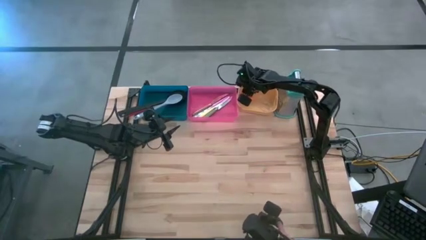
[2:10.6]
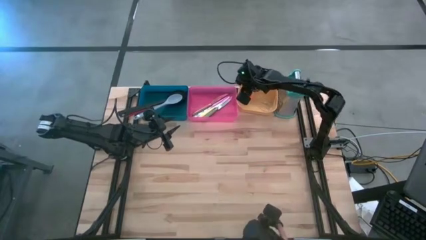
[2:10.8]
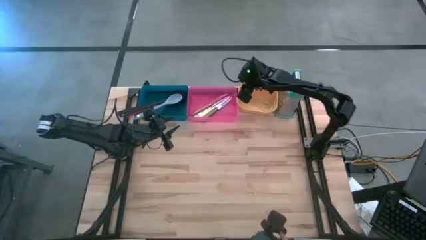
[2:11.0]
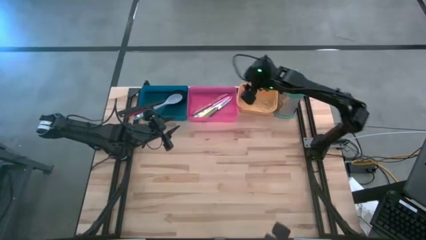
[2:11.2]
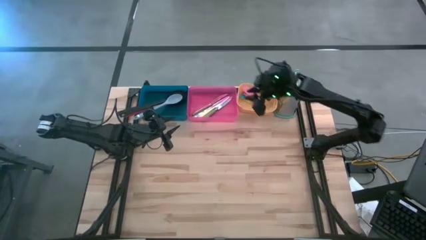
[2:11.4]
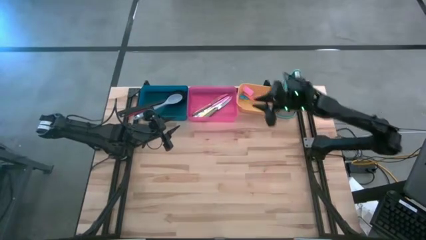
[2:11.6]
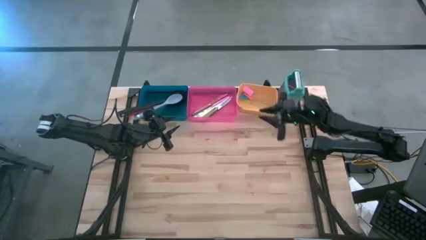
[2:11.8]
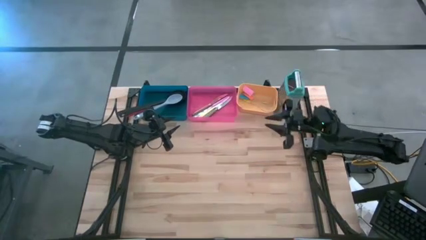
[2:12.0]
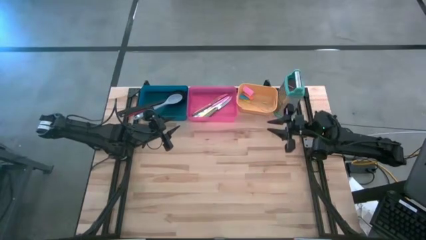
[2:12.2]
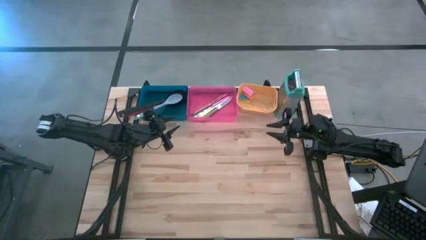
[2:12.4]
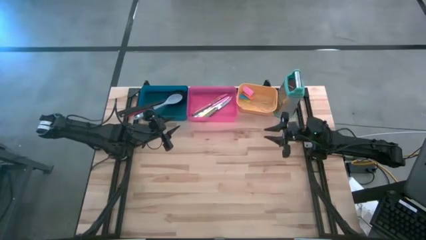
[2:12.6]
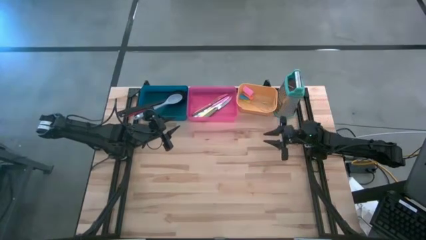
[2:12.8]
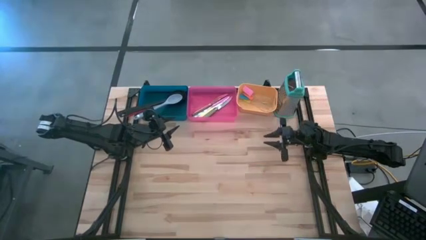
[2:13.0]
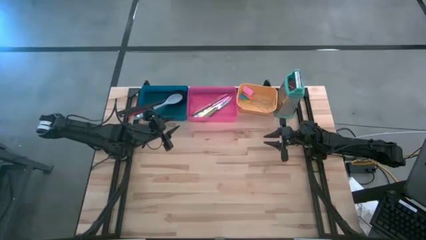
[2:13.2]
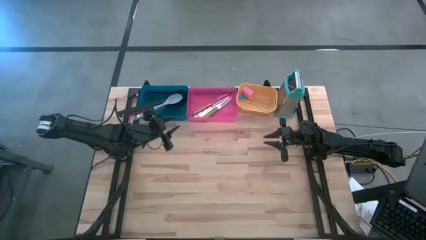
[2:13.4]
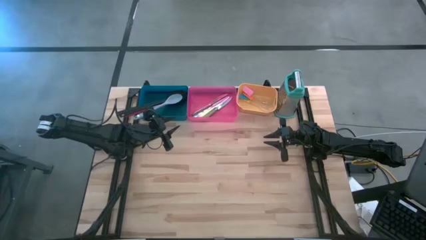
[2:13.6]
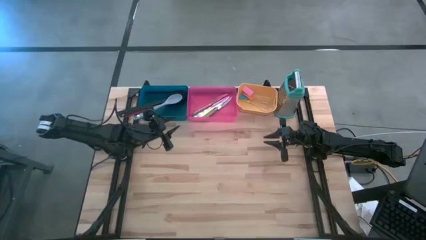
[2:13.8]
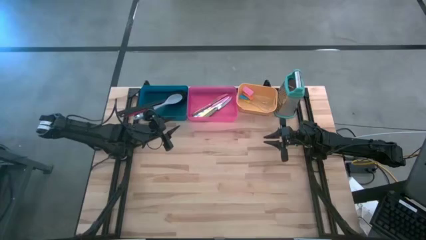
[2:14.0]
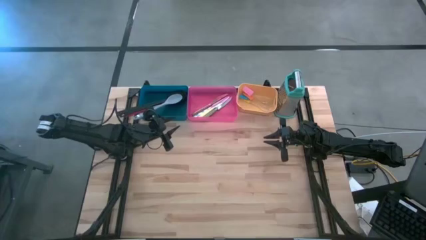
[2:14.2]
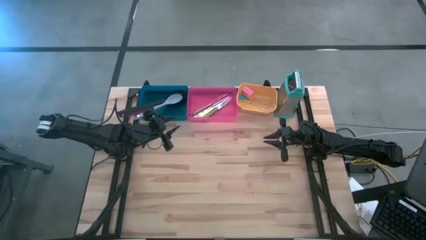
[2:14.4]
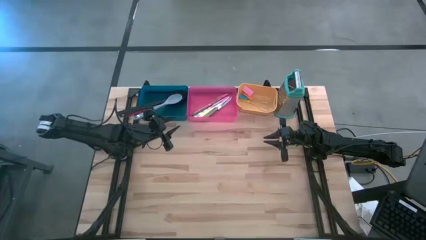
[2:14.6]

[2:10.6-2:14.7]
Task: Pick & Place Kitchen Items
Return to Home Position

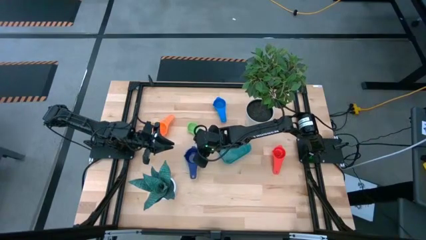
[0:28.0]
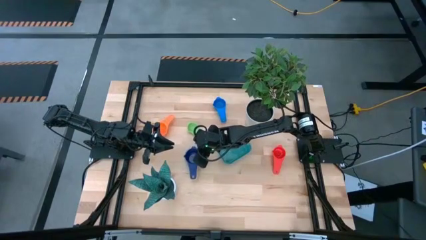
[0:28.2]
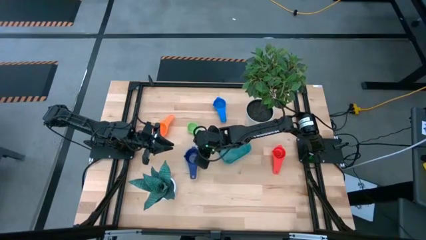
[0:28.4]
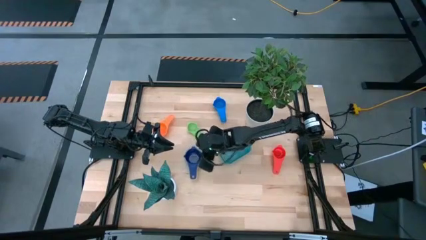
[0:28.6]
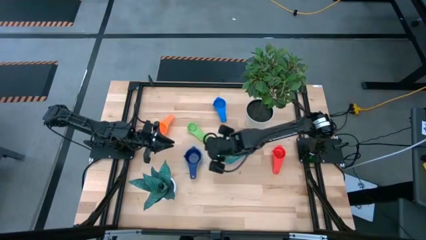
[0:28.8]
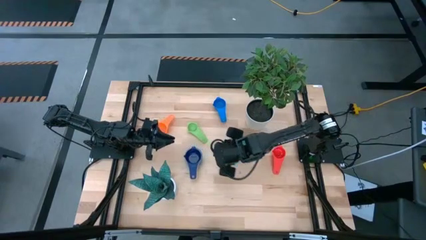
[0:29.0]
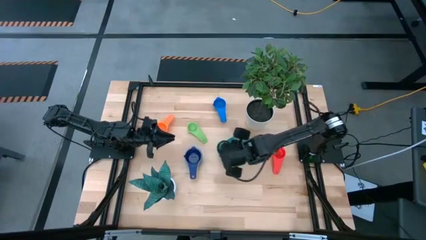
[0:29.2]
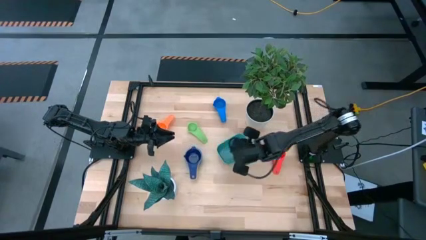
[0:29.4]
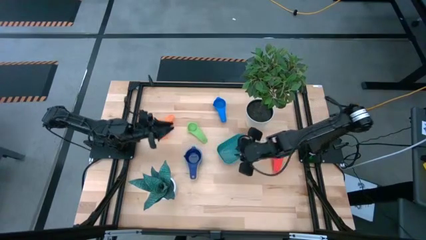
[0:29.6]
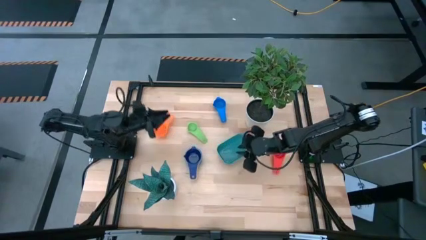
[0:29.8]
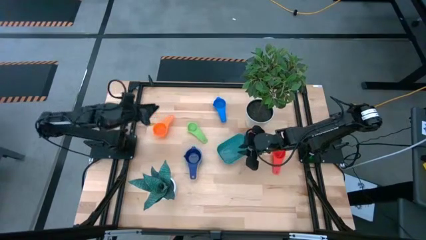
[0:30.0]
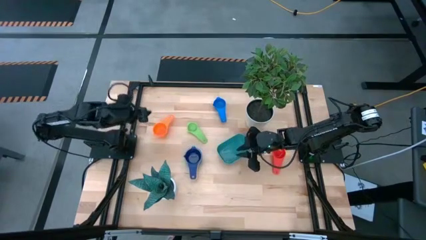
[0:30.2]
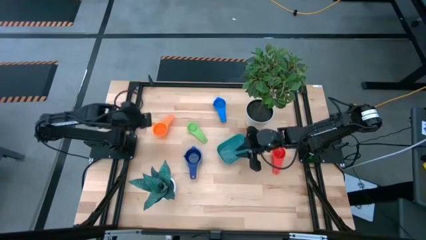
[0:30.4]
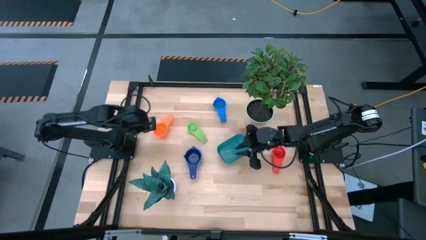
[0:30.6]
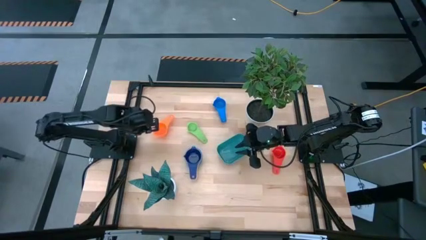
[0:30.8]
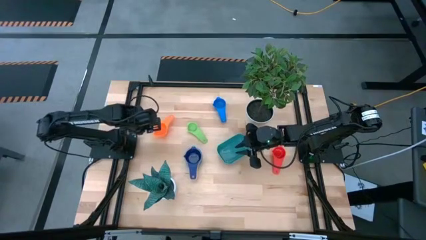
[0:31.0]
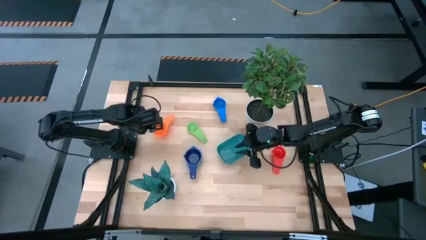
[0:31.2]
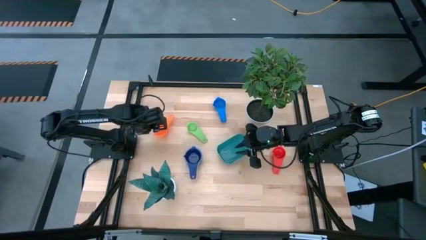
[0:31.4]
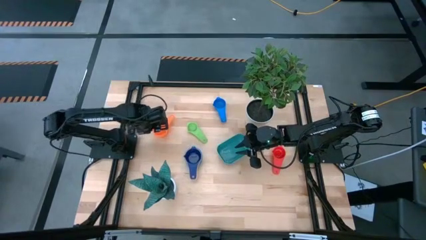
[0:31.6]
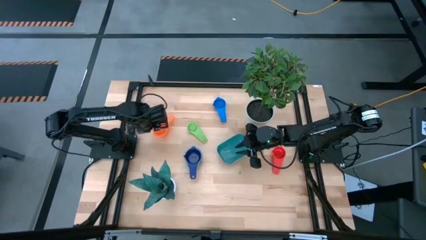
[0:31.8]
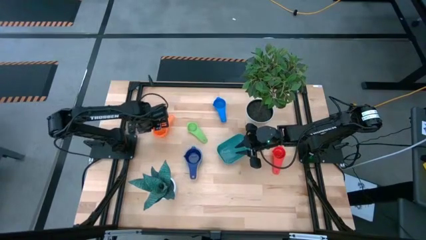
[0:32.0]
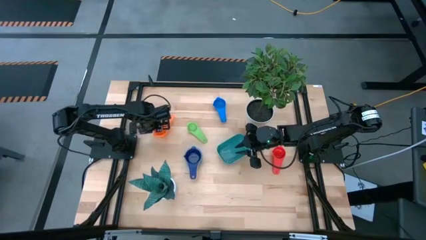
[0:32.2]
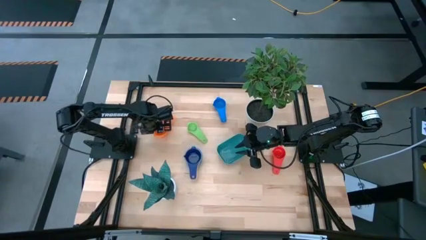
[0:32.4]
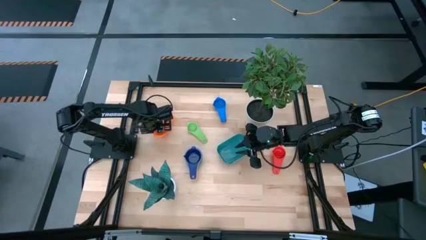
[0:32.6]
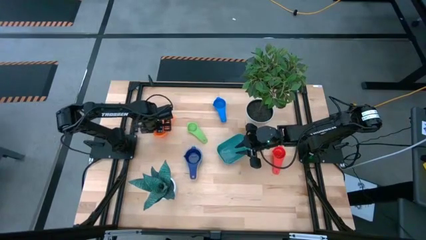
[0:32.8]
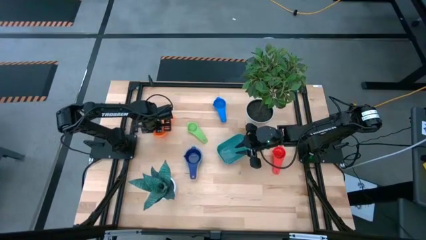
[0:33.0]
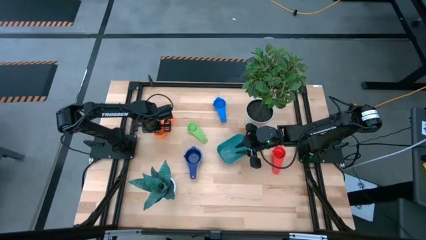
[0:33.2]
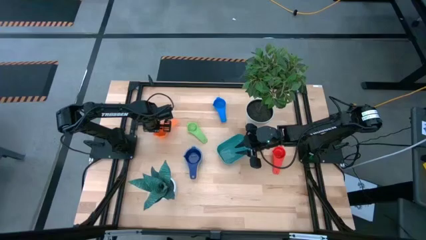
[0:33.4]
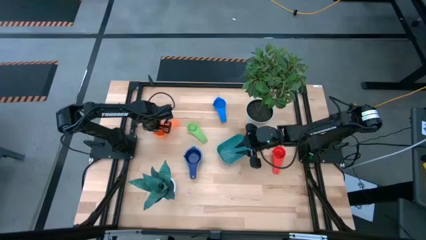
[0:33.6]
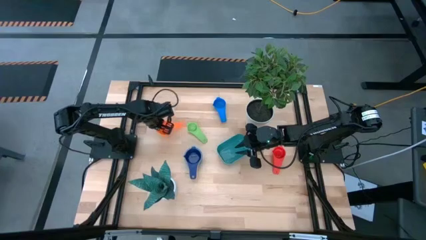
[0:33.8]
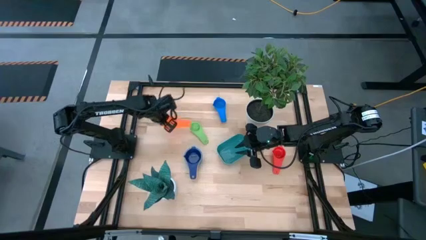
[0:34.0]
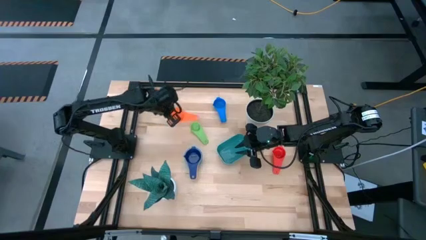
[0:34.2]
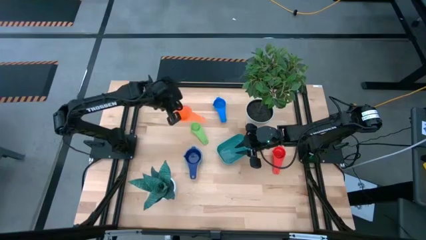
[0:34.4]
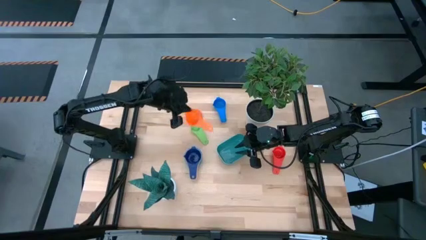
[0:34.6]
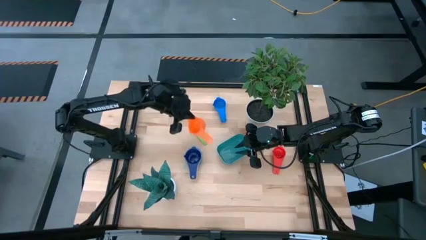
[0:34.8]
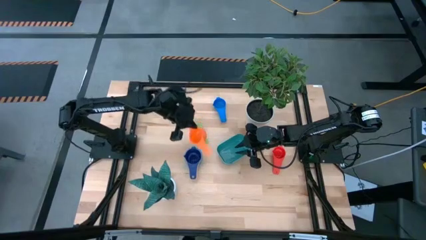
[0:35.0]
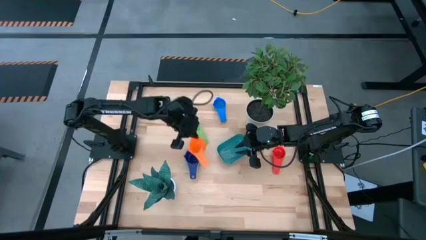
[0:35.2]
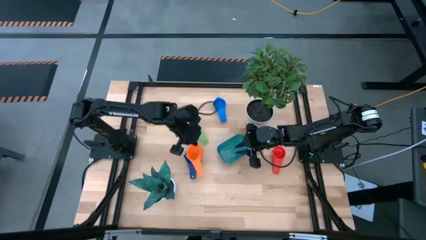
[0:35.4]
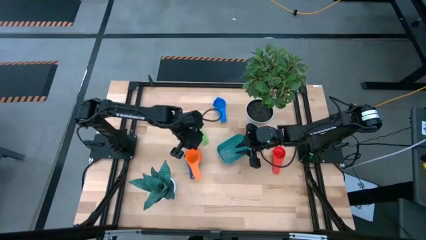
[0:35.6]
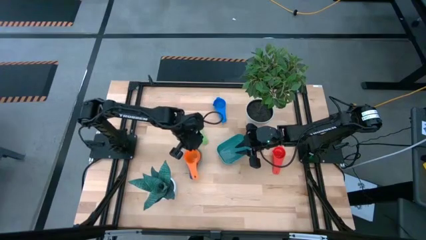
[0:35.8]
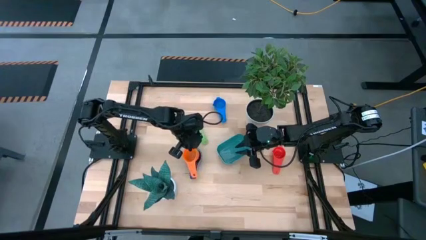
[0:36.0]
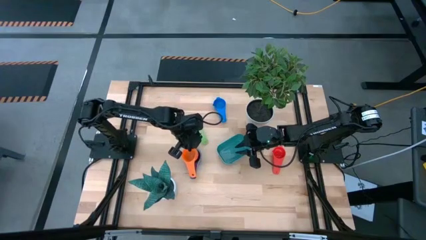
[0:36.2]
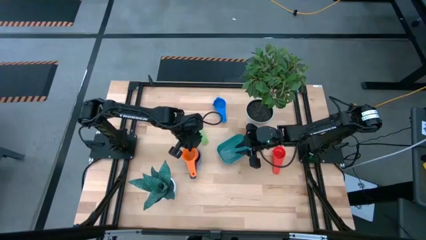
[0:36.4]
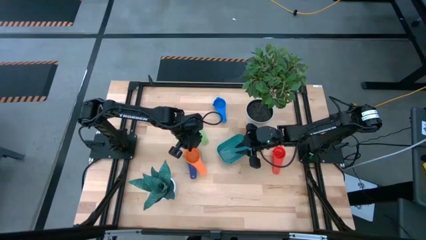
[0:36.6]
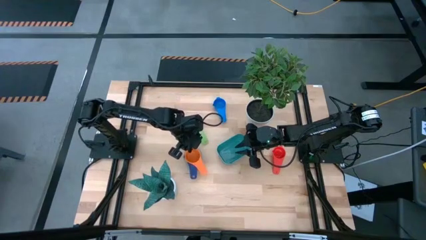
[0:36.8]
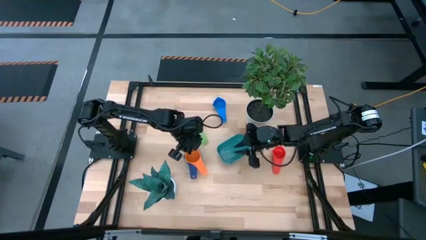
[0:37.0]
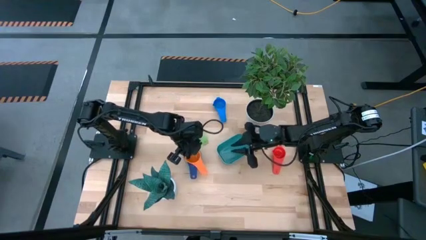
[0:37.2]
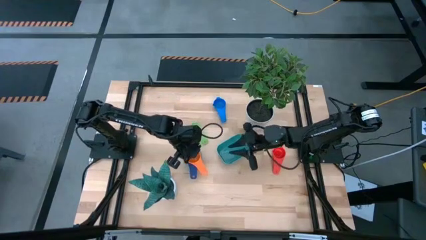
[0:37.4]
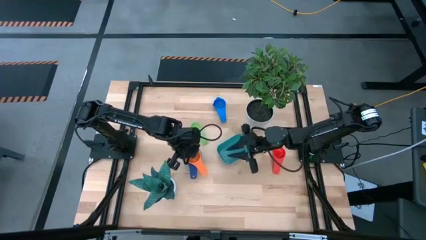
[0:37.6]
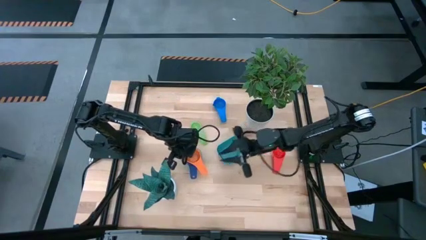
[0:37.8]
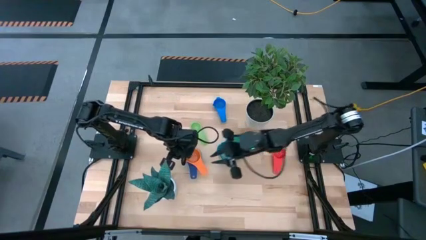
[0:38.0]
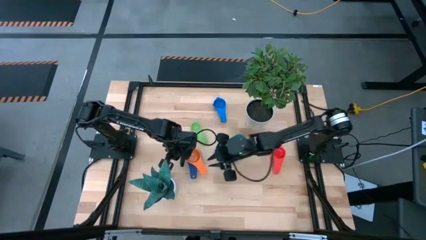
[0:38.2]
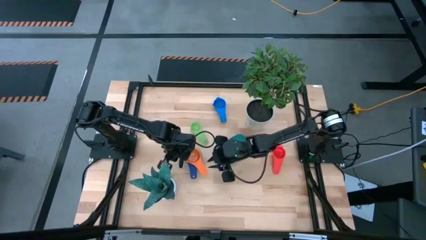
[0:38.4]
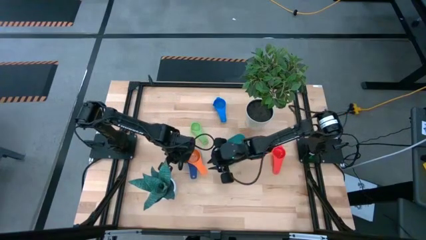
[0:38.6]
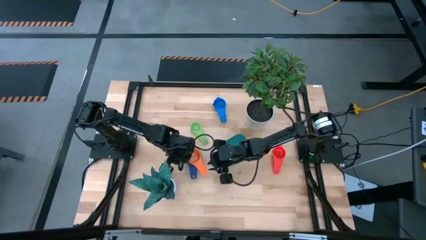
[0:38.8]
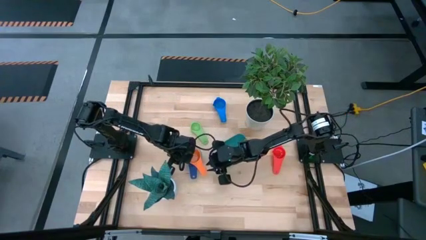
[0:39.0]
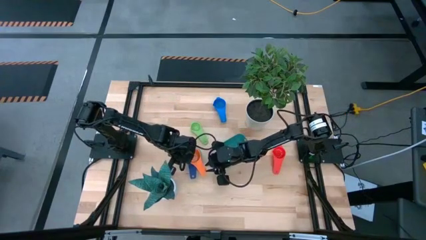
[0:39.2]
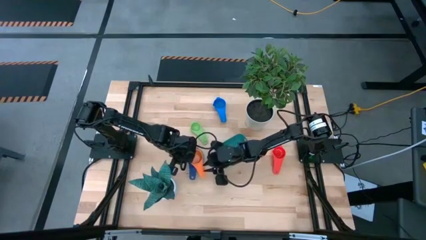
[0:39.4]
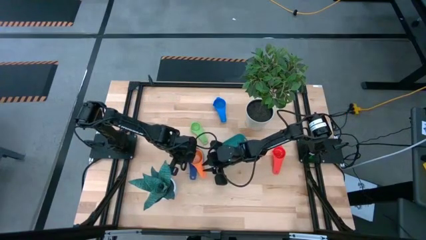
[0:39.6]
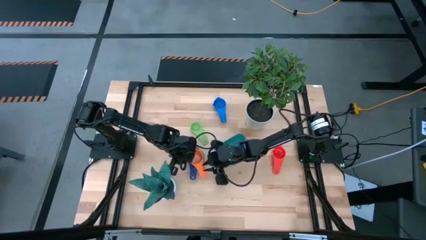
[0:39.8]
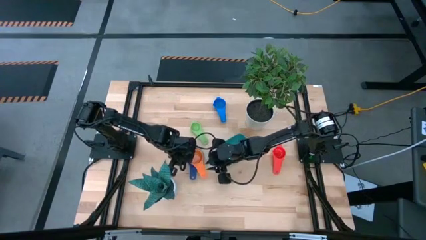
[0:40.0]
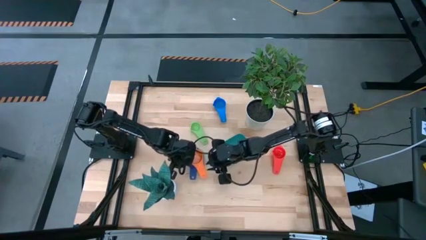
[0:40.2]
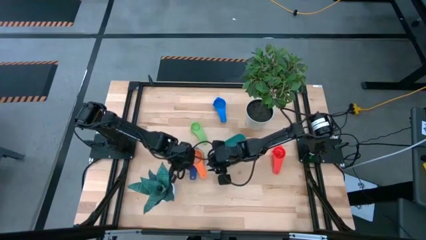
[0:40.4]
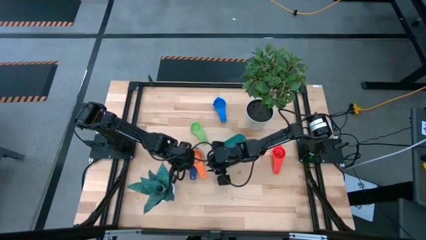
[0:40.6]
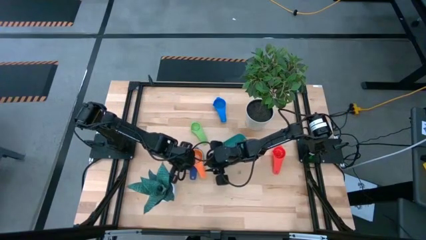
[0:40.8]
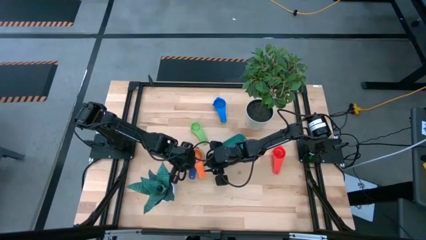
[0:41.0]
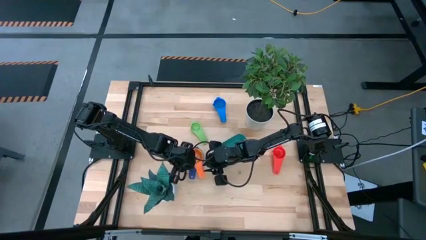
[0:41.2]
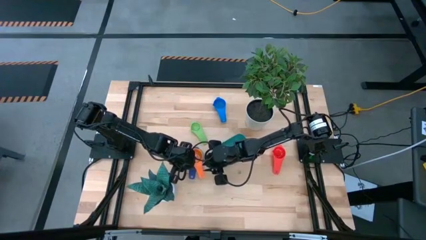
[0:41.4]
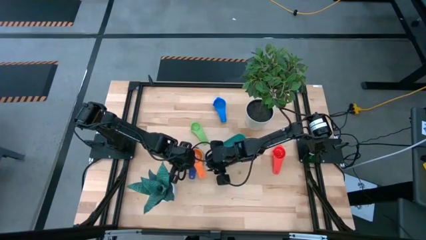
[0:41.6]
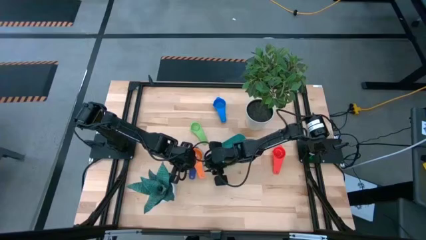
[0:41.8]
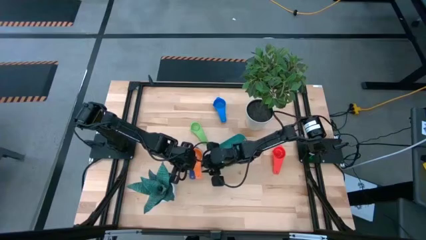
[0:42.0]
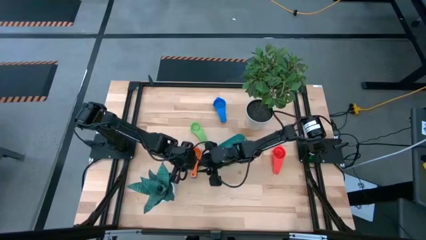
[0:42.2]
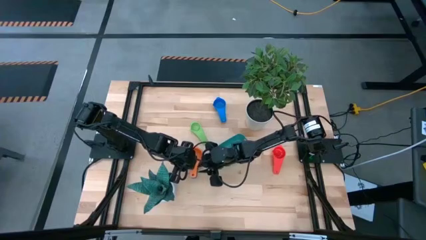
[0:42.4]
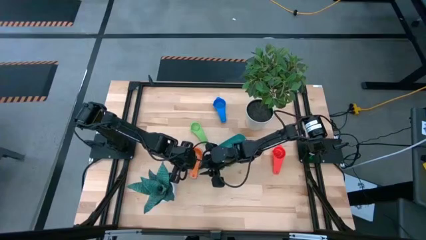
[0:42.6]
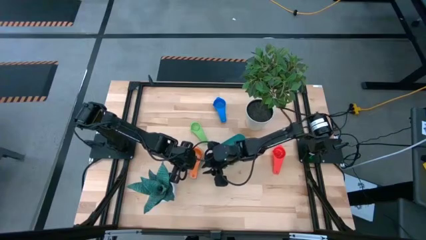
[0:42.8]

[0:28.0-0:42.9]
Task: Nest measuring cups in basket
Stack the orange measuring cup on top of the dark blue measuring cup
